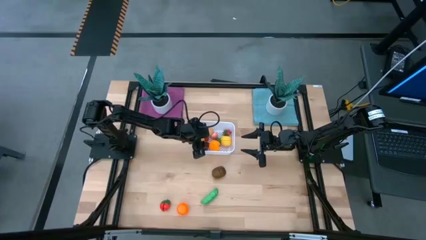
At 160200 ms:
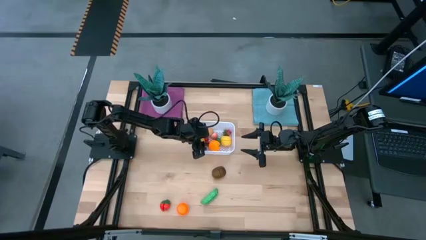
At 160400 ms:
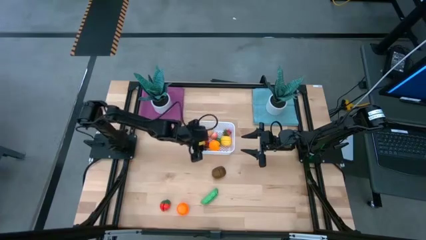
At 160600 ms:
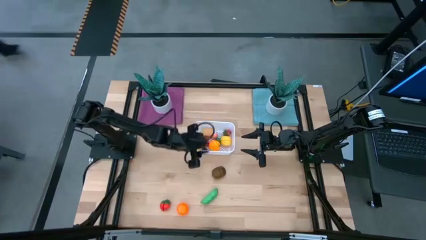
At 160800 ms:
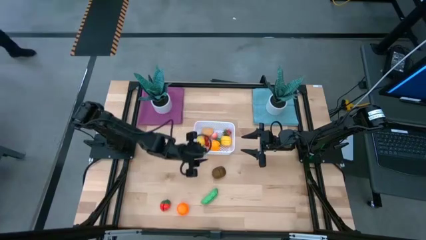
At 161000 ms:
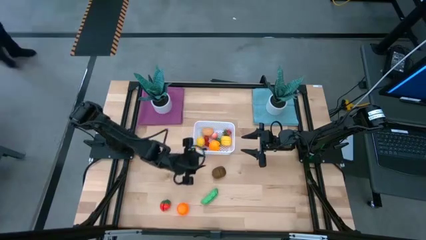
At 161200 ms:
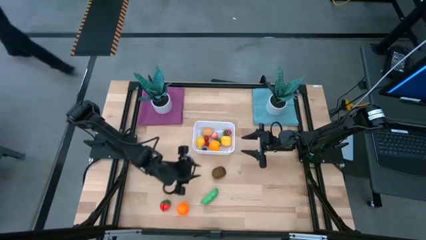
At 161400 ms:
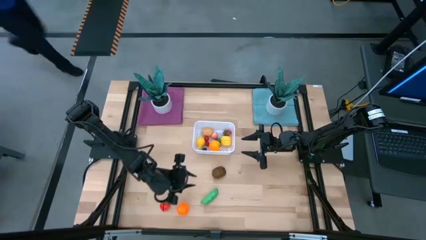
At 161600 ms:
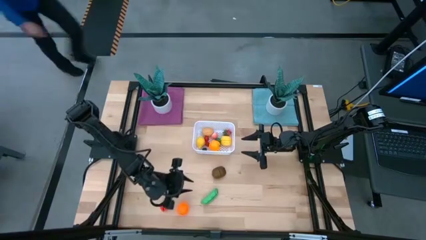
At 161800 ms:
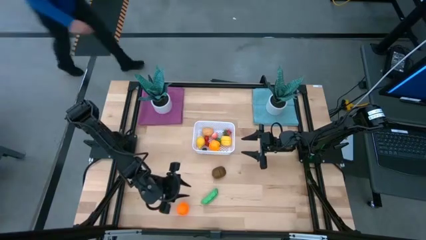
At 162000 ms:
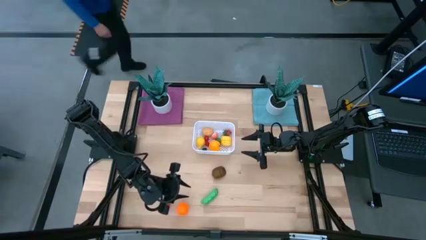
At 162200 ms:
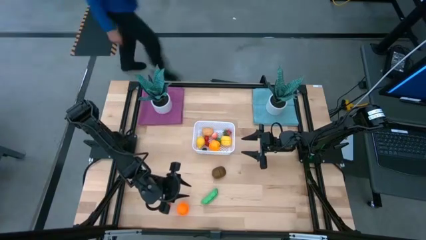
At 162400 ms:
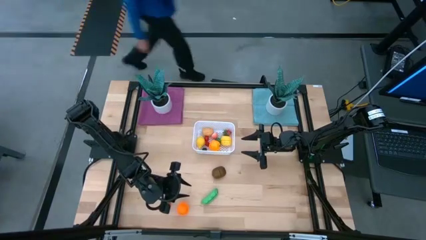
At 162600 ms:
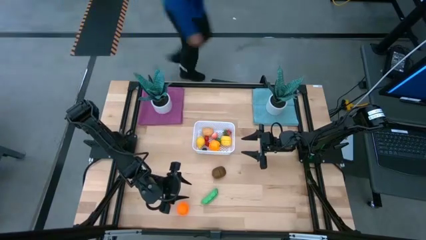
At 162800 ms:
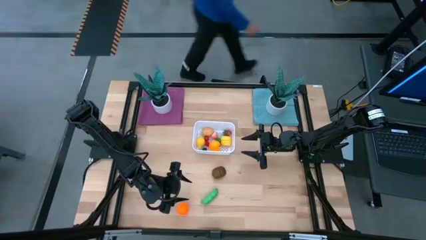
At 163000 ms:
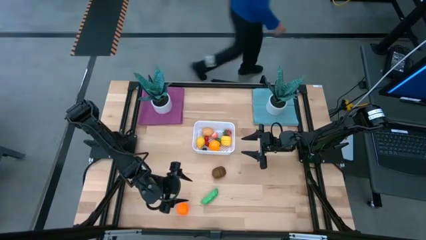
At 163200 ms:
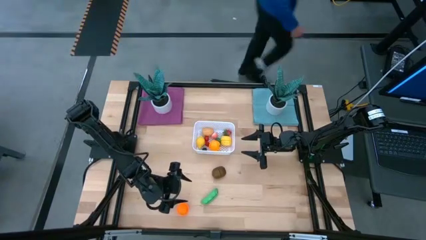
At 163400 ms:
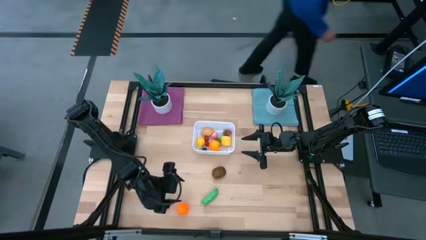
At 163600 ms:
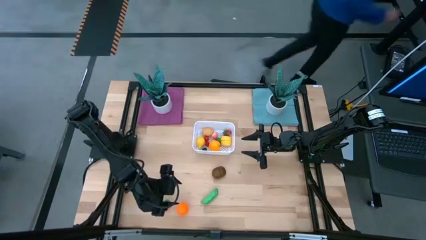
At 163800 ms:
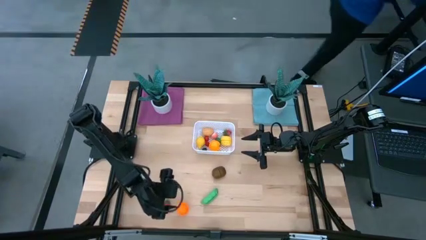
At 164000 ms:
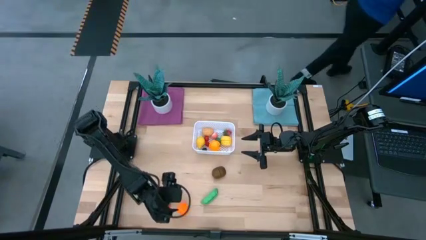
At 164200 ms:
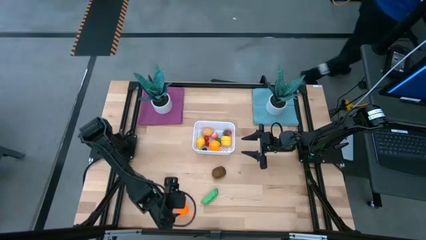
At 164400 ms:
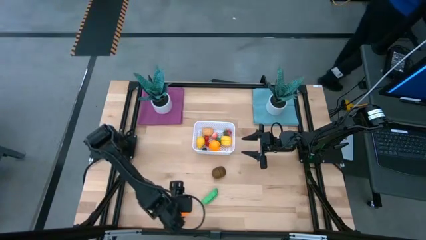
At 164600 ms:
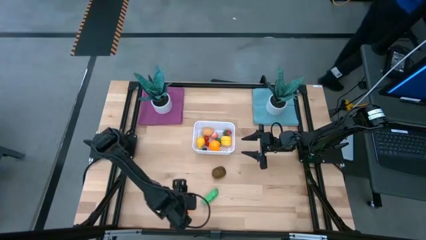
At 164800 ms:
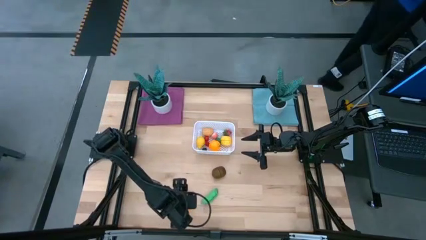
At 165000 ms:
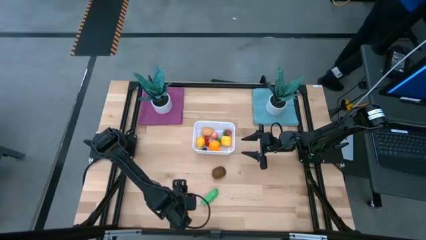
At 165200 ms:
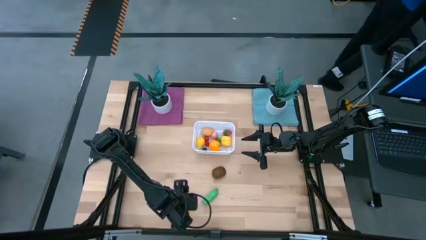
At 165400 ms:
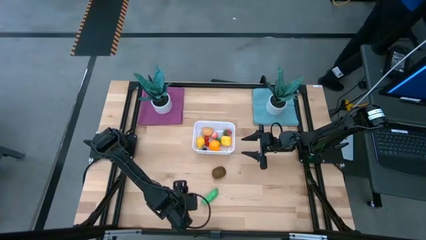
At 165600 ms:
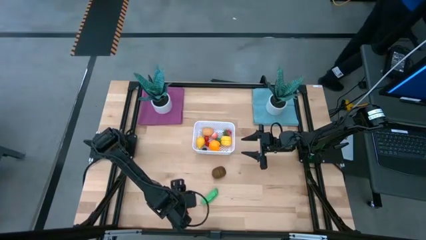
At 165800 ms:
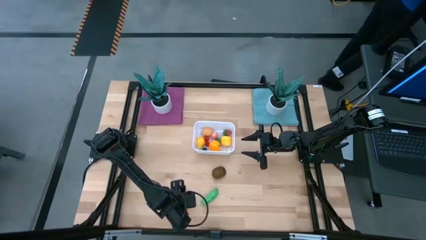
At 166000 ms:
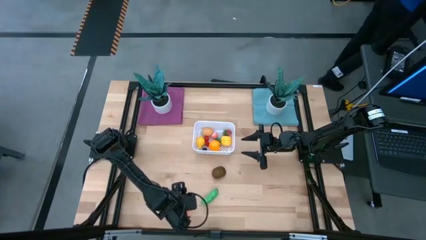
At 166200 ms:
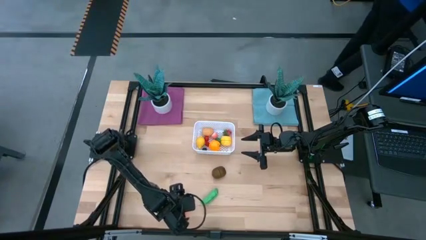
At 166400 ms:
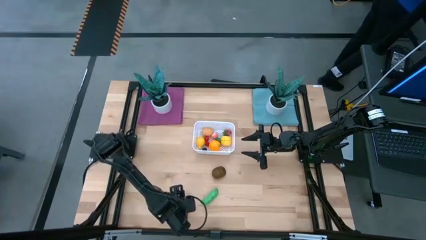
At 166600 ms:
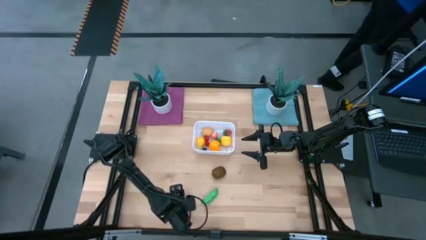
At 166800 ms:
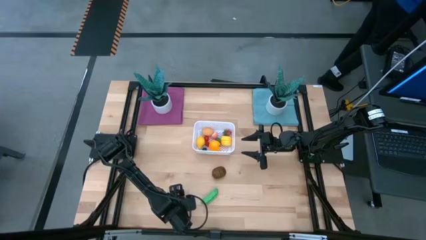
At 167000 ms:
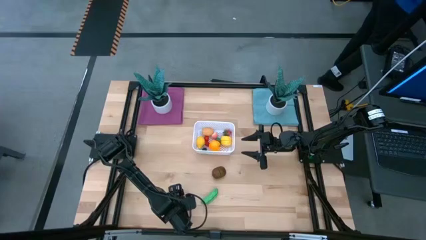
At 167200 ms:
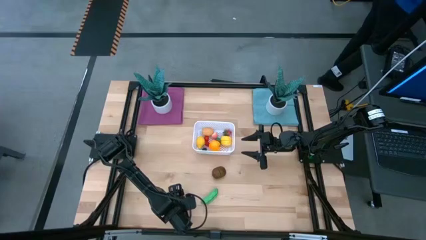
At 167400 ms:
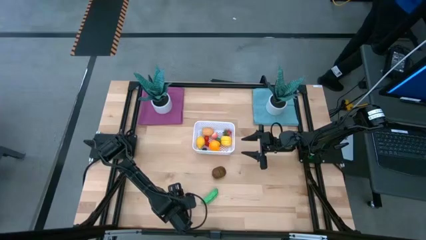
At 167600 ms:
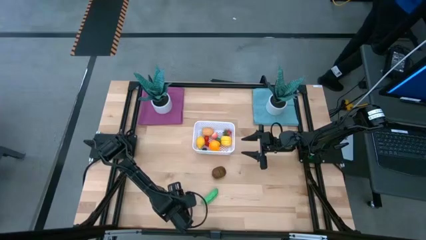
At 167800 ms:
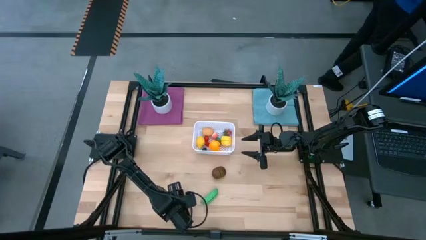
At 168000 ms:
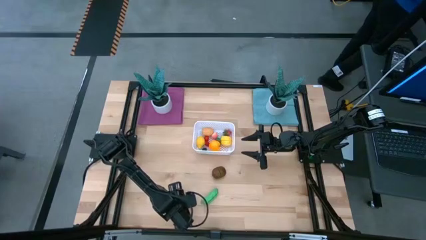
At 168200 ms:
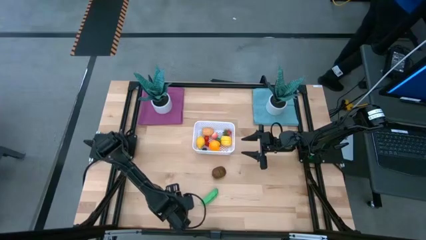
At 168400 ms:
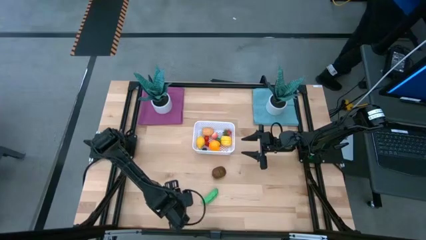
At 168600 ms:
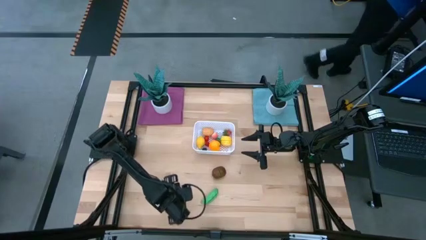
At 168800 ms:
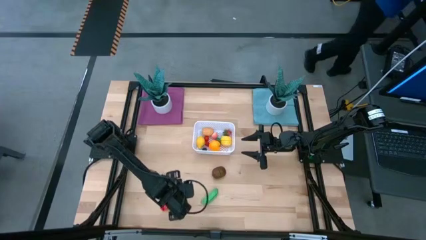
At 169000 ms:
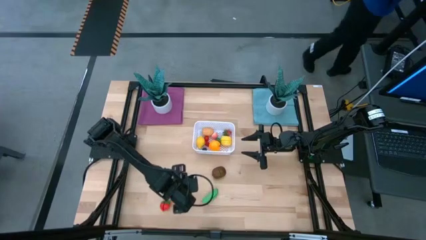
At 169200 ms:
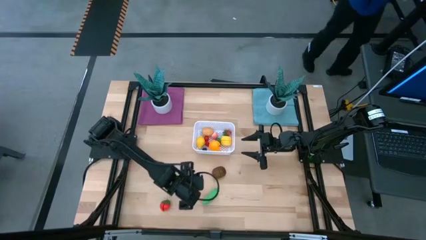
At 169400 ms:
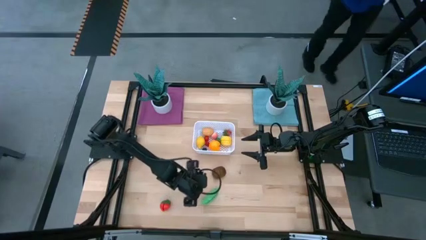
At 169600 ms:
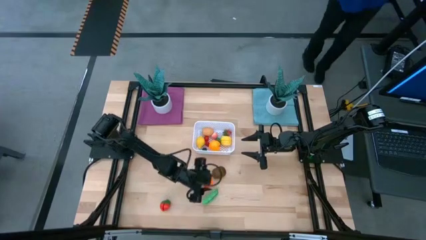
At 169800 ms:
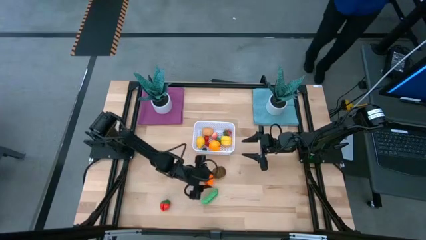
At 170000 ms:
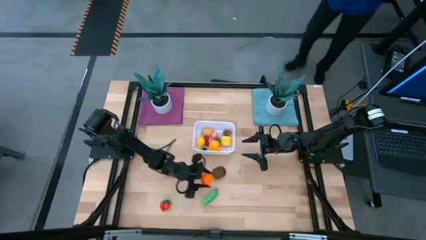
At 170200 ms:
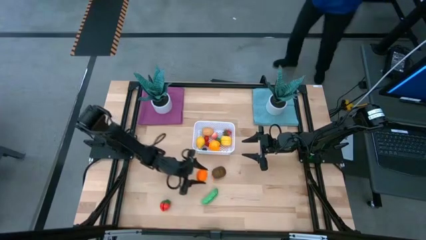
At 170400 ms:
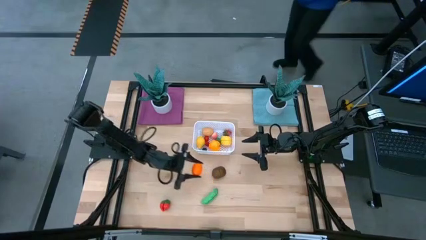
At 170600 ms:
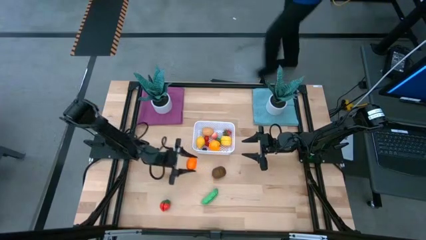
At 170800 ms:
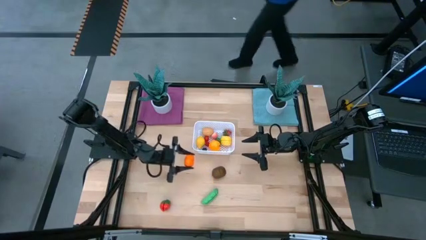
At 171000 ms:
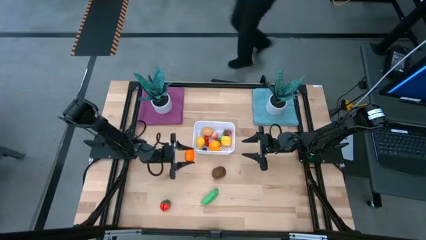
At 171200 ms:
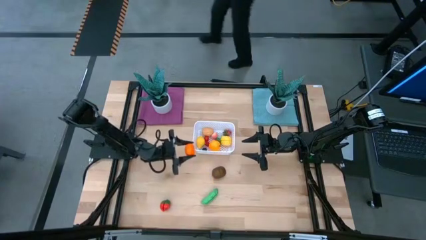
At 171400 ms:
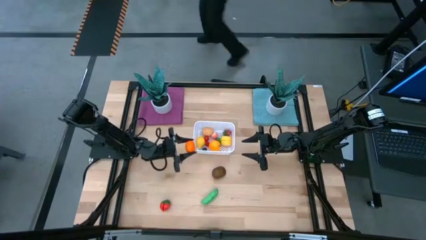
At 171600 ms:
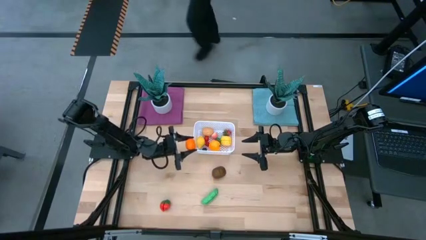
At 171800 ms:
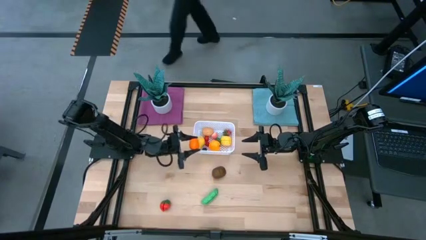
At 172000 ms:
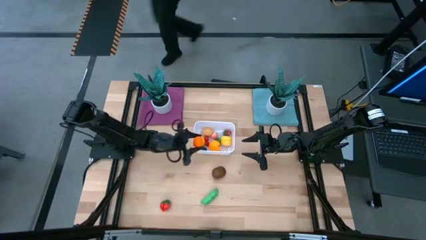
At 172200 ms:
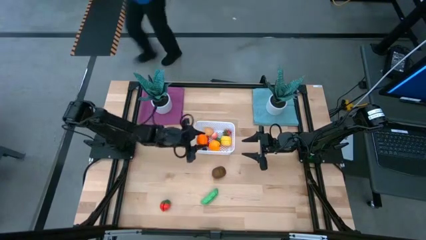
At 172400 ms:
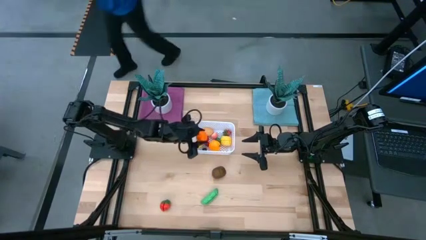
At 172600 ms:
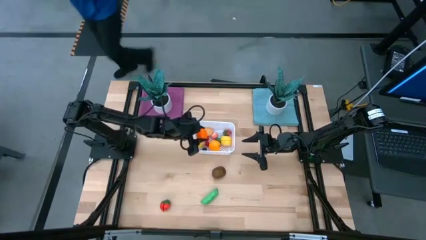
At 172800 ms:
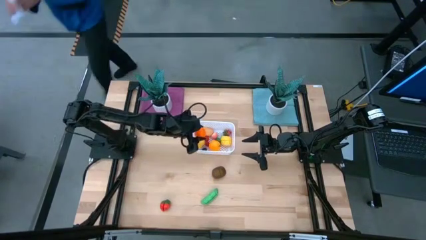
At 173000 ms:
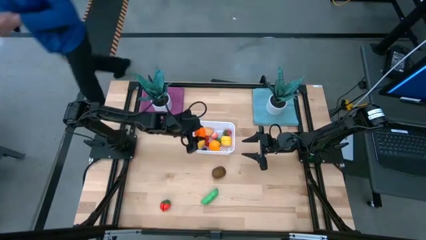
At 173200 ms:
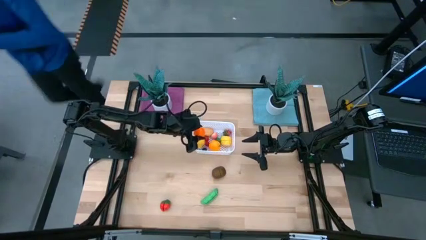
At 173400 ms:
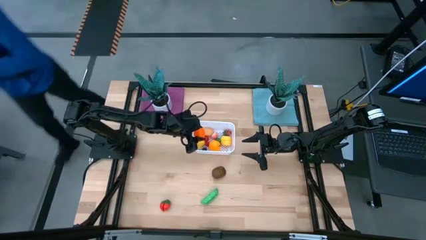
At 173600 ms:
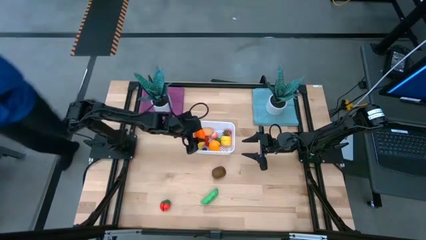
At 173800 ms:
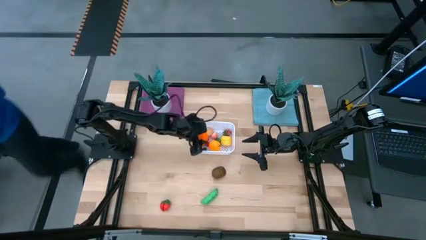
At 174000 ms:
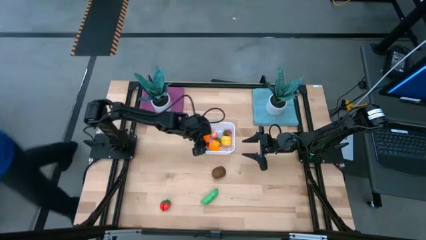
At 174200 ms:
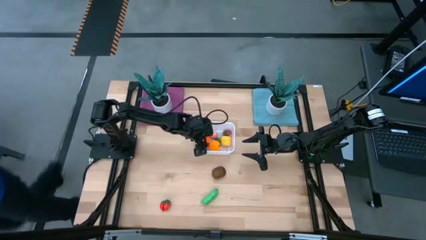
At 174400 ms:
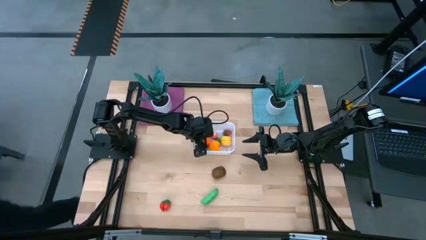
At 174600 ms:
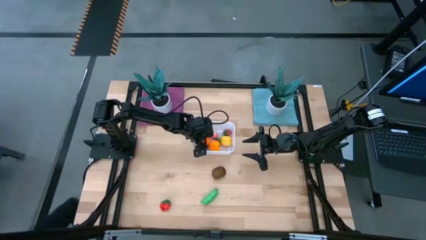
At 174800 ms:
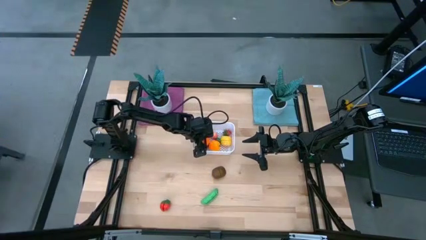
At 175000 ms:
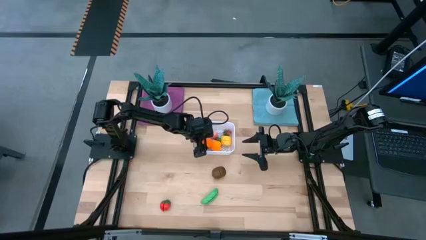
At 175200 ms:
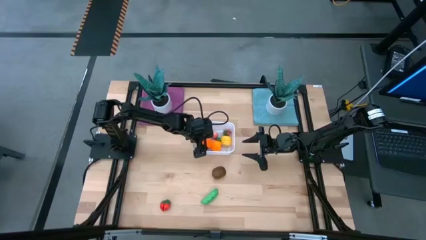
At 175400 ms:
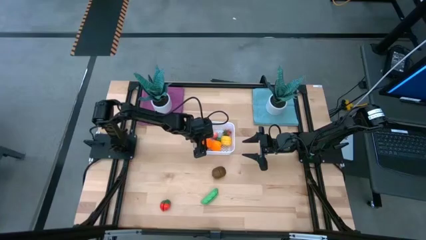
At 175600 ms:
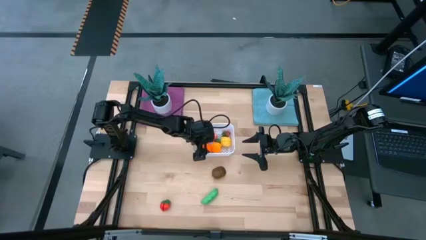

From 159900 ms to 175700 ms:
Task: Pick and placing Produce into tupperware
Put the orange pumpkin into the white bin
